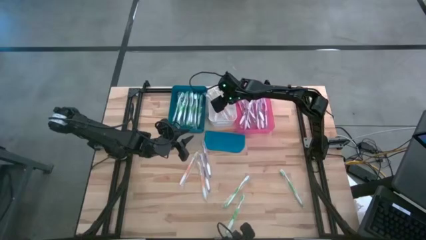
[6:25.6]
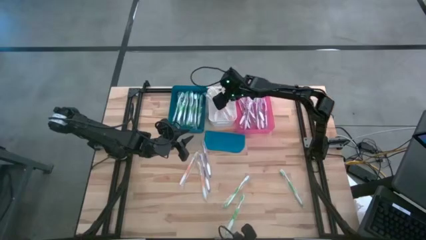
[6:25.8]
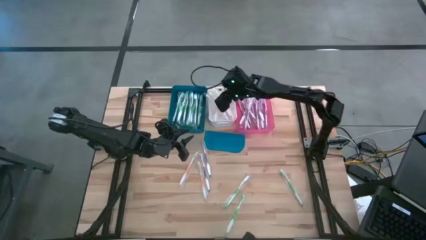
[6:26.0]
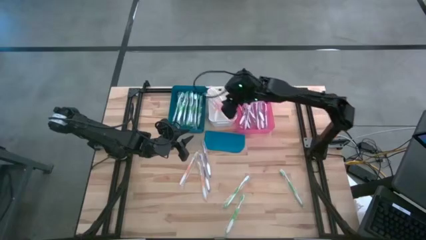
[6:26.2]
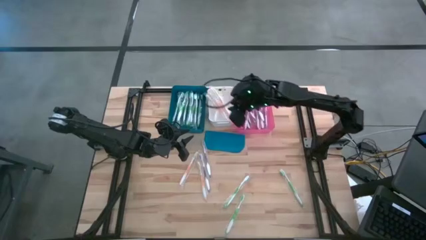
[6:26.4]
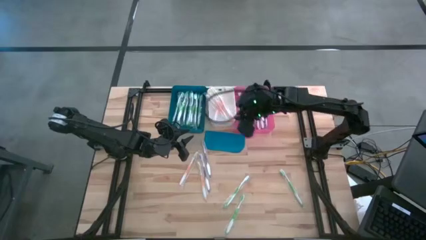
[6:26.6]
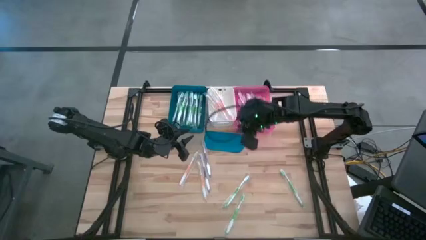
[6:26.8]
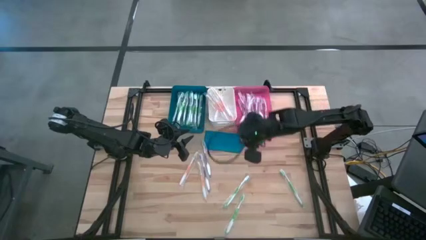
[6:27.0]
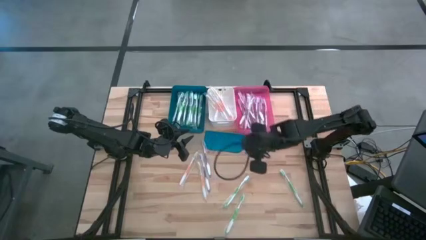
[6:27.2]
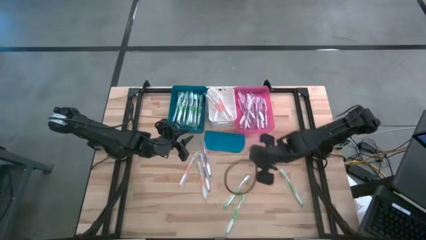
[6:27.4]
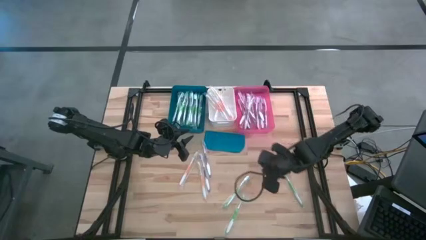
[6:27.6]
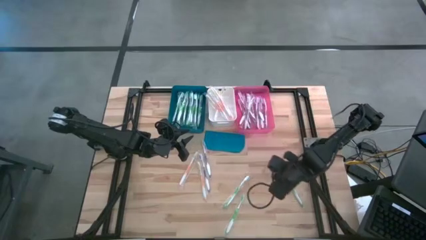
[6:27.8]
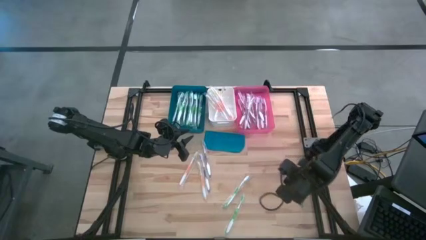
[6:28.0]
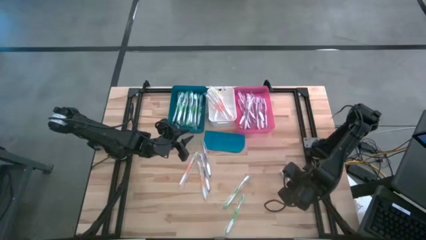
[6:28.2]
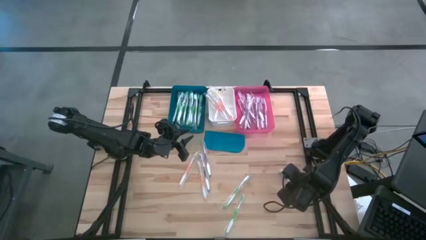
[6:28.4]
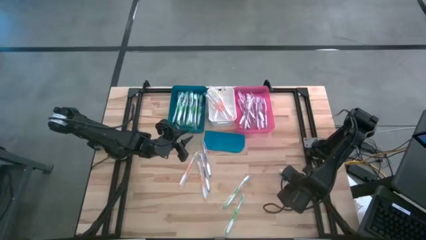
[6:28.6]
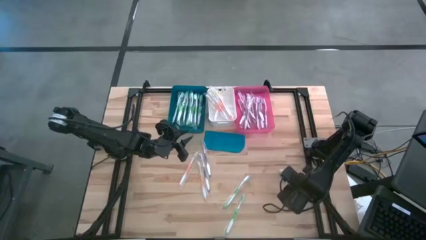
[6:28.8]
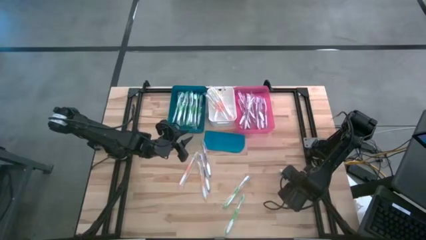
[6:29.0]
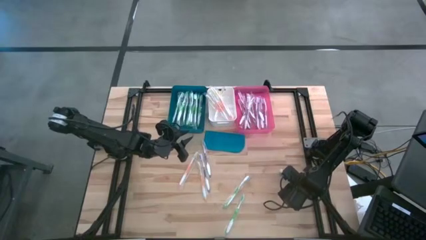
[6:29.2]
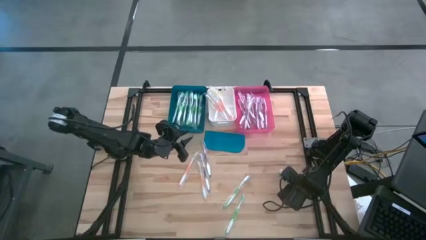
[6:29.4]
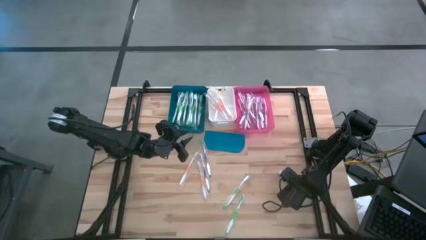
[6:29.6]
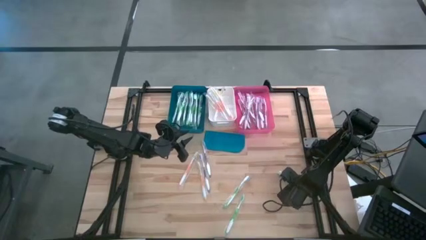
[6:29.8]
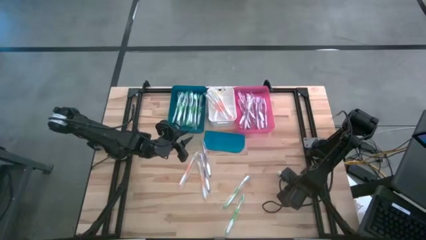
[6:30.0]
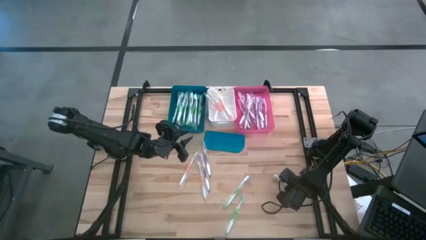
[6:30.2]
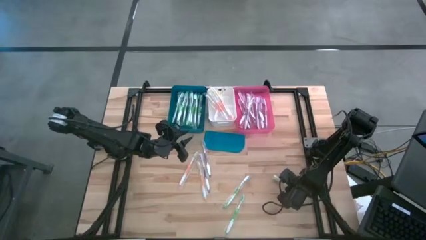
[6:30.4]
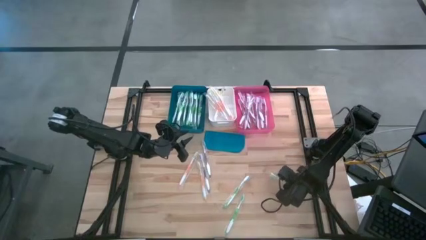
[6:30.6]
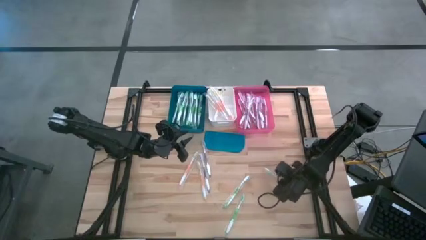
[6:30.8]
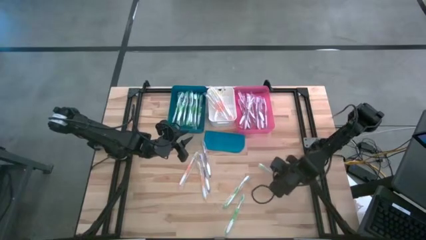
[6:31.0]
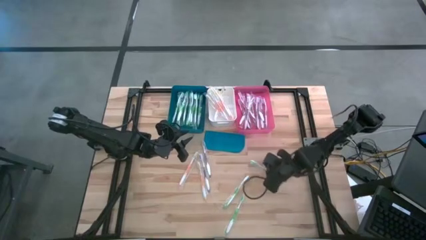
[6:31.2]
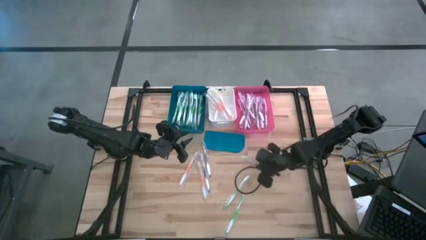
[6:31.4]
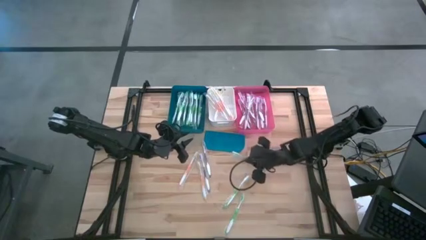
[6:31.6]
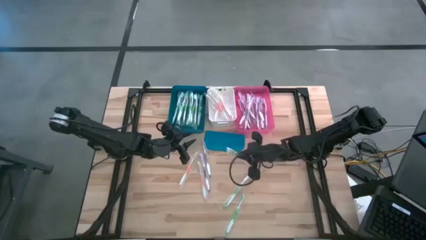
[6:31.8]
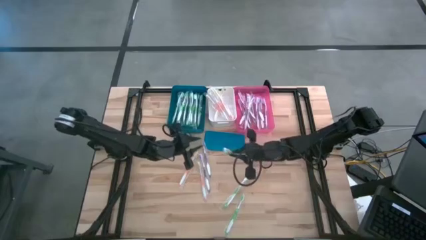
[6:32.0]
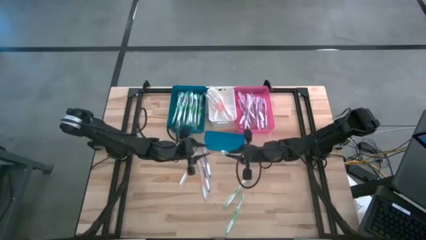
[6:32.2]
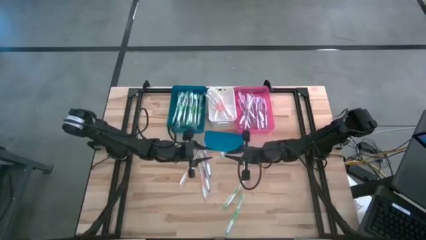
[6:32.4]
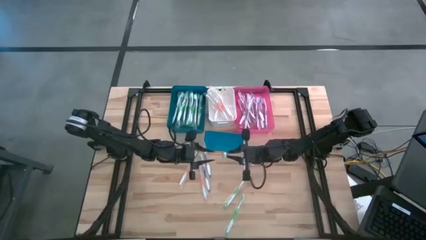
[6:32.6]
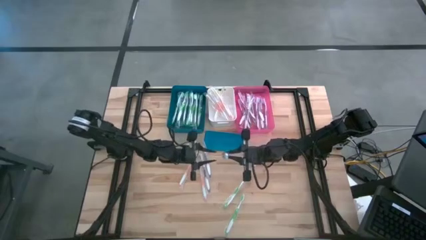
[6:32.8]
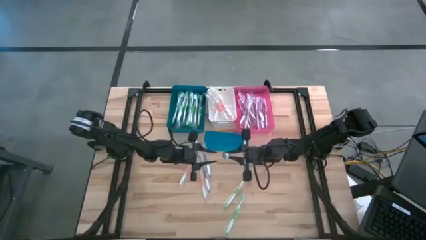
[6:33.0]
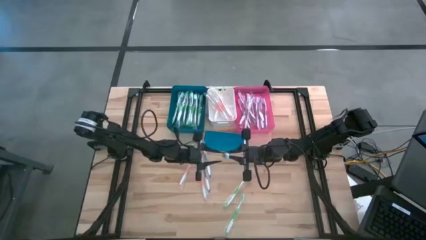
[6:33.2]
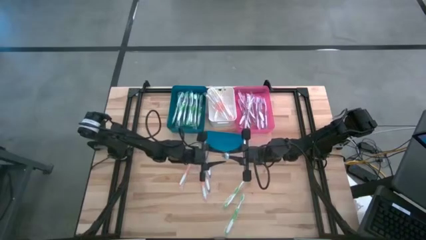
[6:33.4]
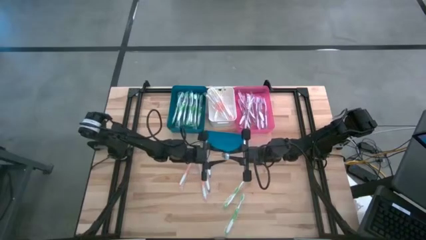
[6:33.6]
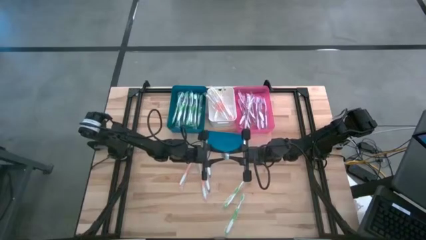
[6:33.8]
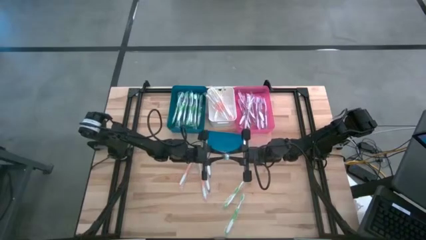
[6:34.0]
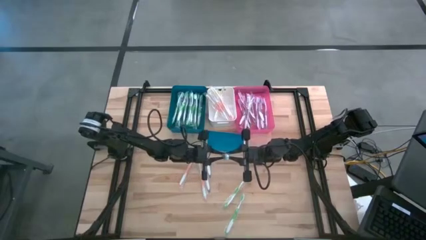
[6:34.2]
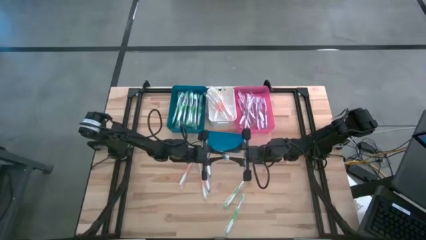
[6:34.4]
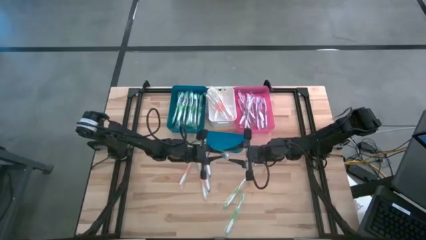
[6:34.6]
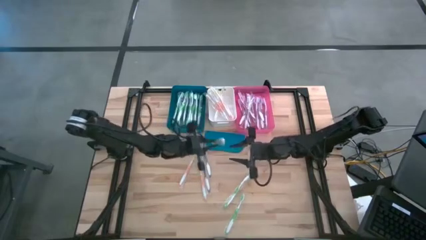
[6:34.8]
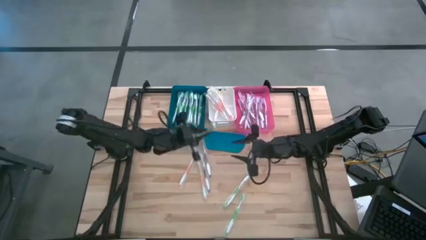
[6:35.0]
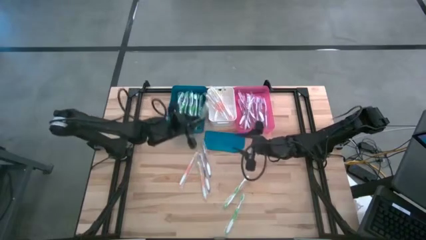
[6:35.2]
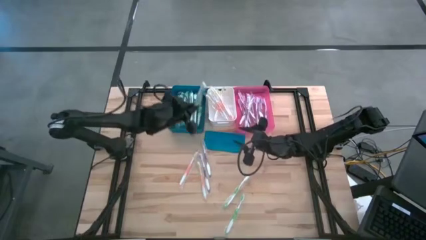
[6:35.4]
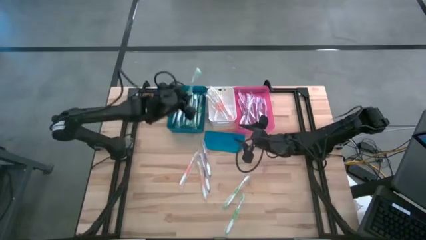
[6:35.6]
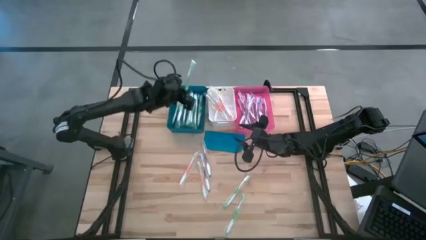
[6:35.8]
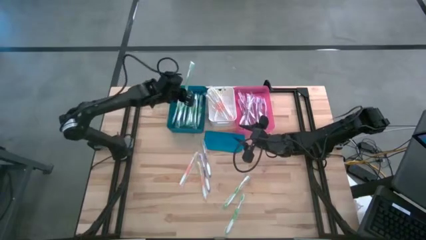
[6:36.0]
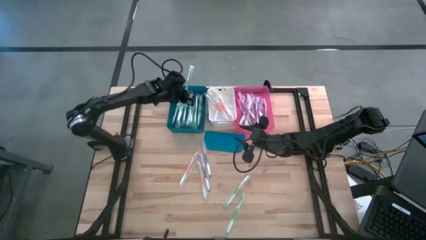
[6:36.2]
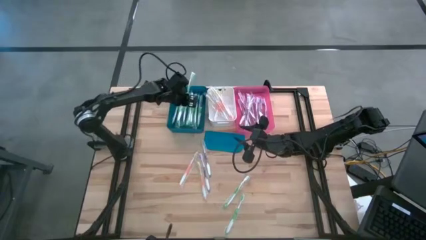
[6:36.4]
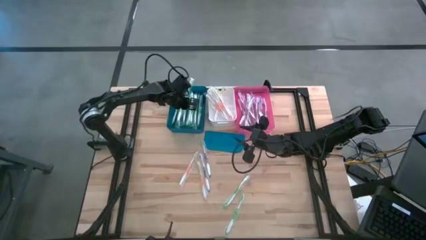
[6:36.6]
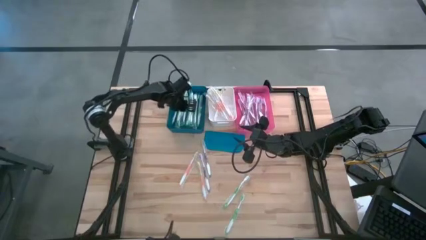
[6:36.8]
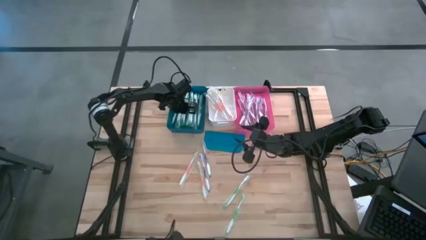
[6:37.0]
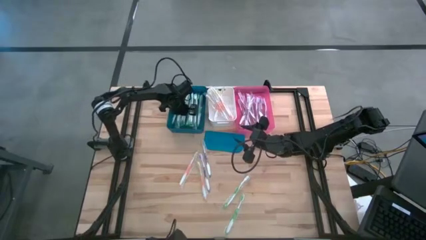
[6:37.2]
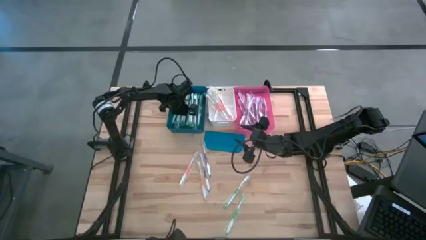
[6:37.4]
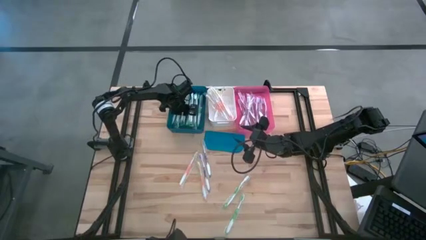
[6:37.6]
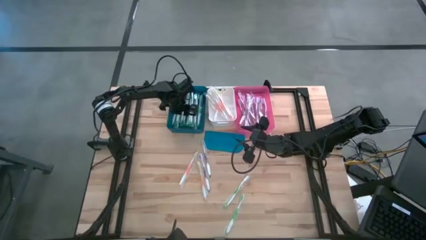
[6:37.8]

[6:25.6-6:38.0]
Task: Pick & Place Toothbrushes
Put the right green toothbrush into the blue bin
